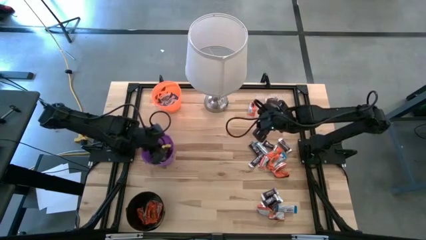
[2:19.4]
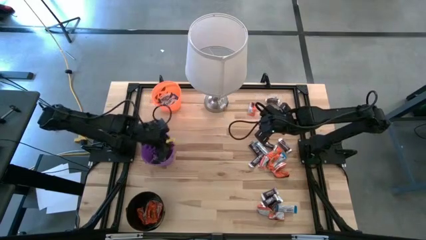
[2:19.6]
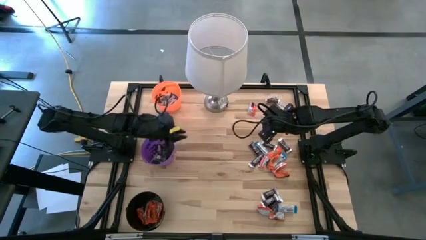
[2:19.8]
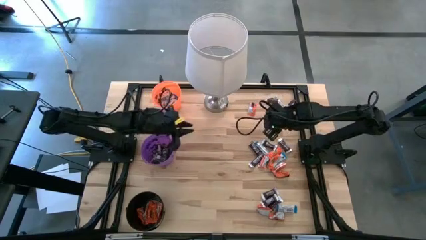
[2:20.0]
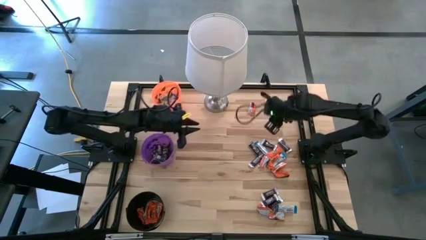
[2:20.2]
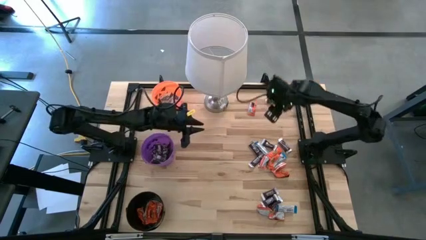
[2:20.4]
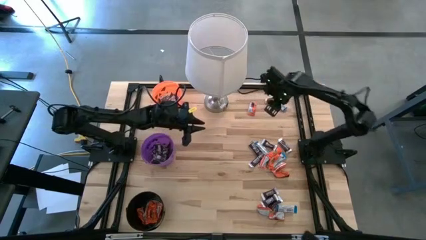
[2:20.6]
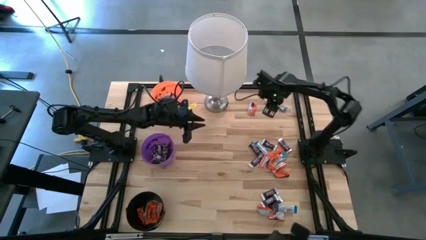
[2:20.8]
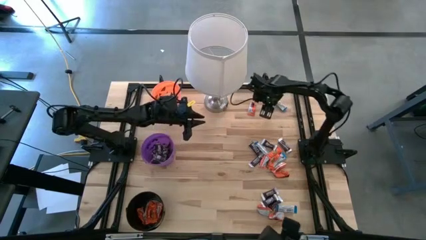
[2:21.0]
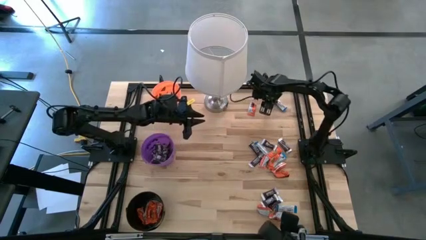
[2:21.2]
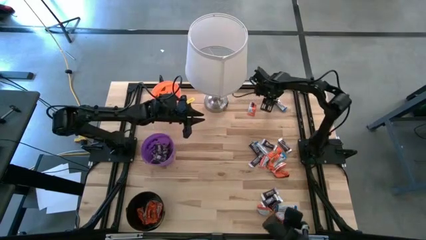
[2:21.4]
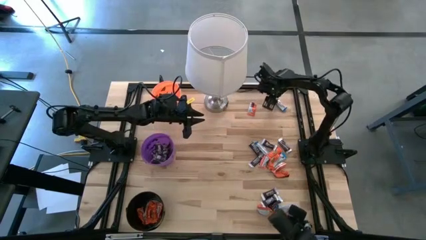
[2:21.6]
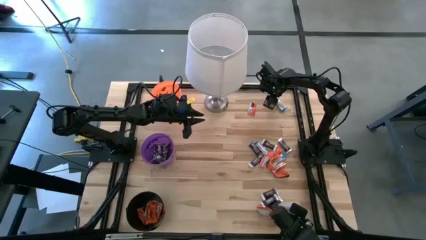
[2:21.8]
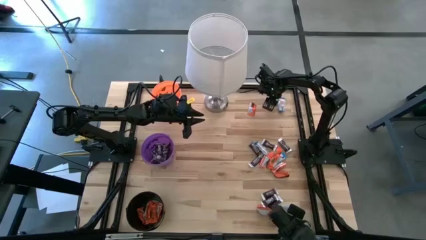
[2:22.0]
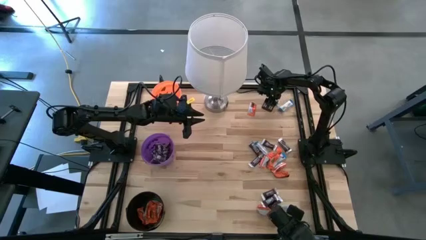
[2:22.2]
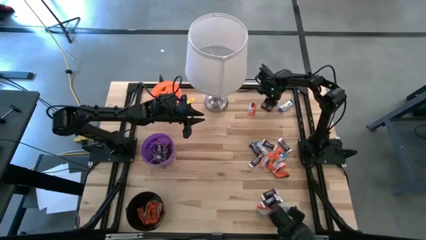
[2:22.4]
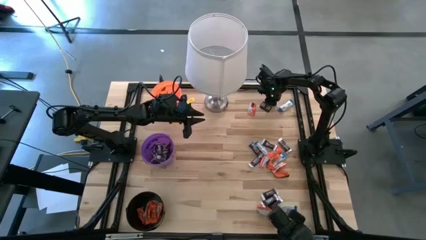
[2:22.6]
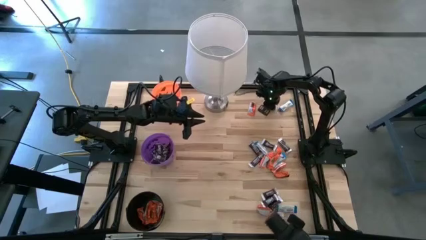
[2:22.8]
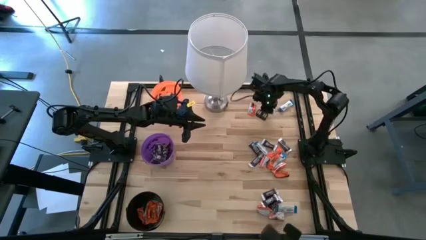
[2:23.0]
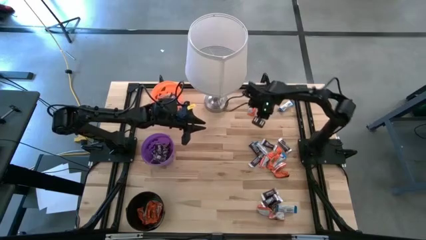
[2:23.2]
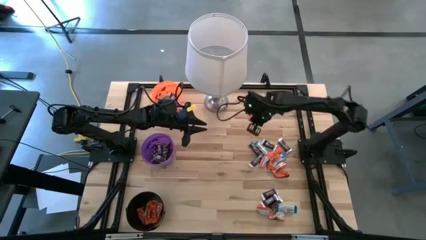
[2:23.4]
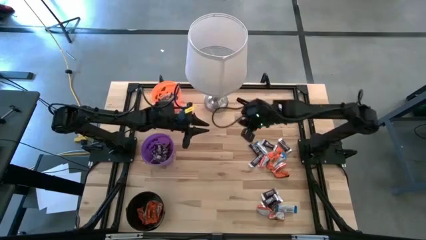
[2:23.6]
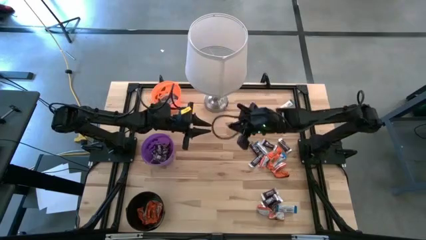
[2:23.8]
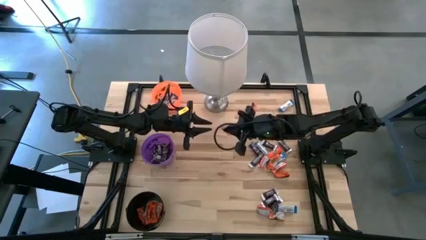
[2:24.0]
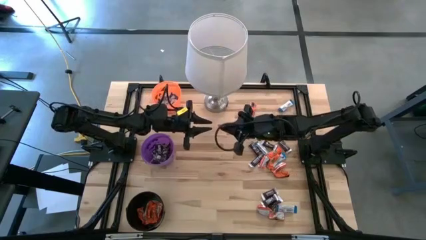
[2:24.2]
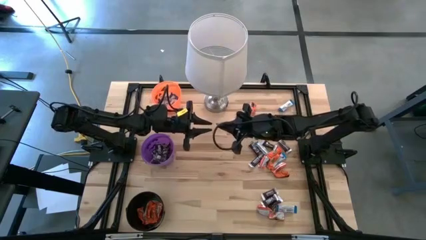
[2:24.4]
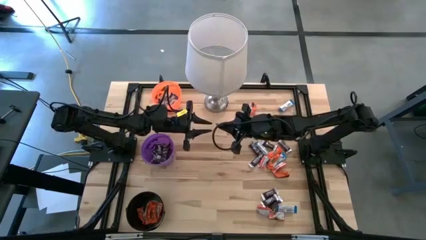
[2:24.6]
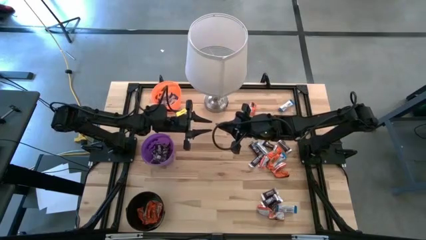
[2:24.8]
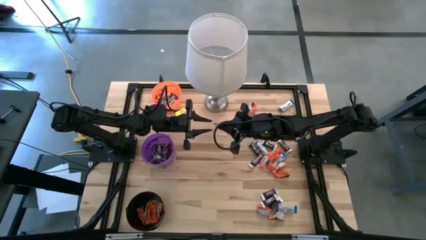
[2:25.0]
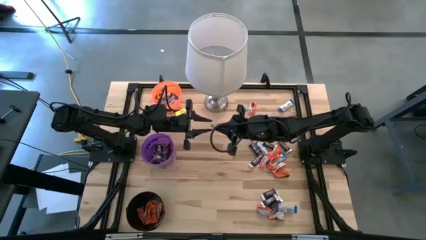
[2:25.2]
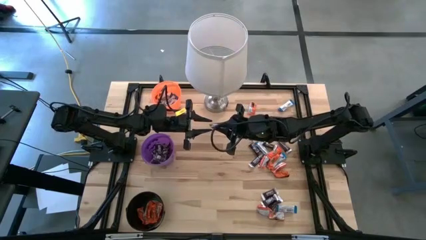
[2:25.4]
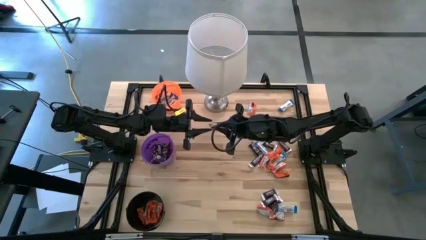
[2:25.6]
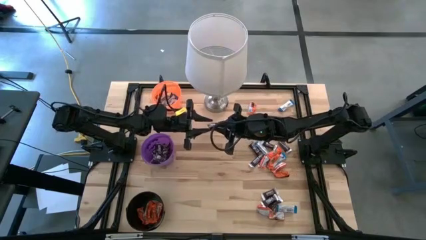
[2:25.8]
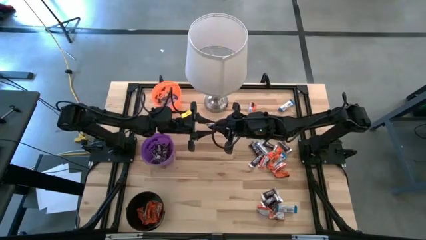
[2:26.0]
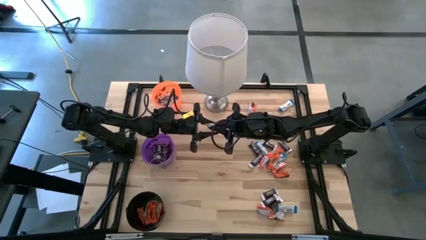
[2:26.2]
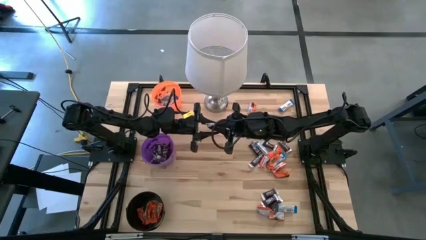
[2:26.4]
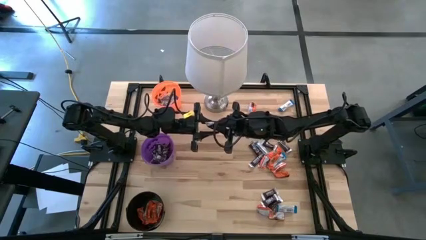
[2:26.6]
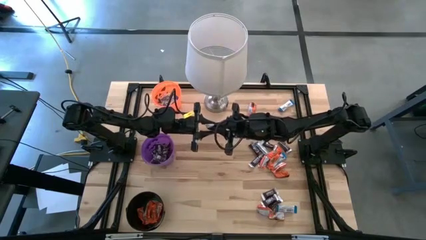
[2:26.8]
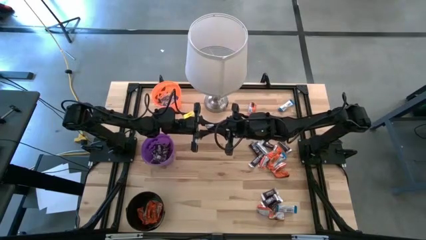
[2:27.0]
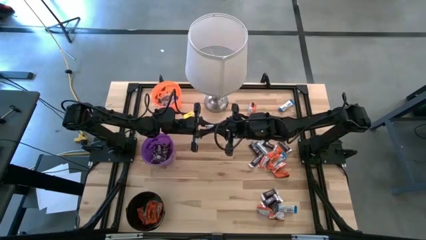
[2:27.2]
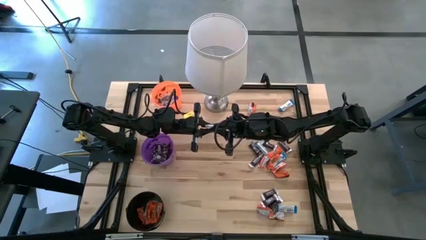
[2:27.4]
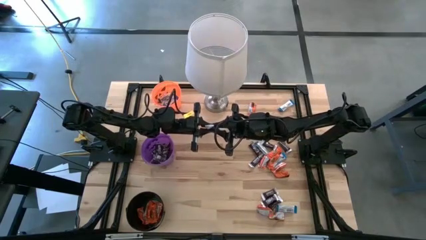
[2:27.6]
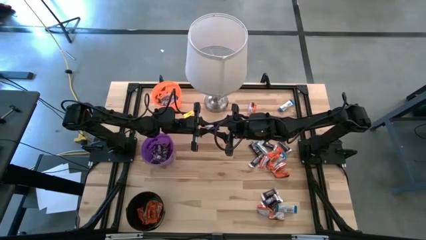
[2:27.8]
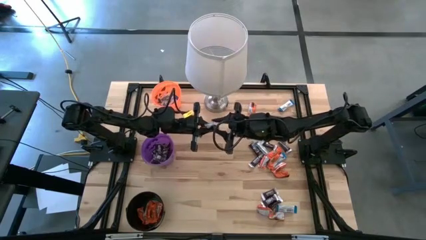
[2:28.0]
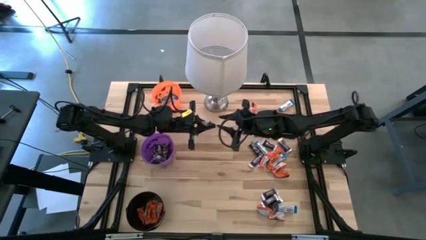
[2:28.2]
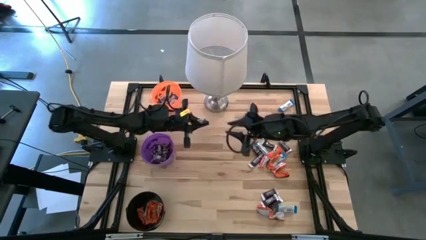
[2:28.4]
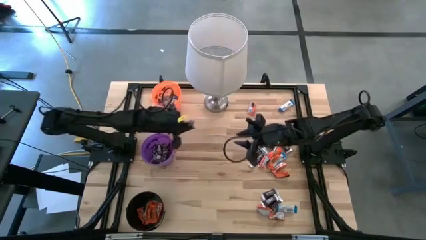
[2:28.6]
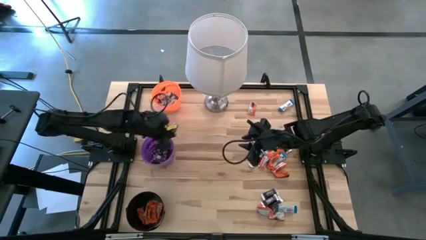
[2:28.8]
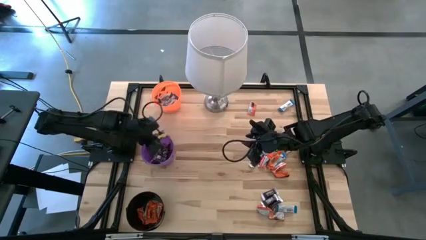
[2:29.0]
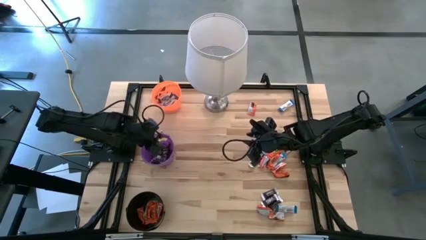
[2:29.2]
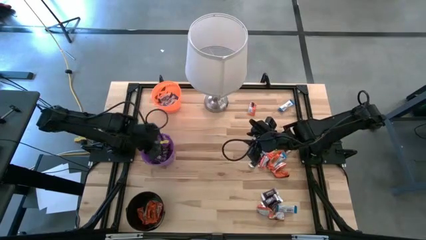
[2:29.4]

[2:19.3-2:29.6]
Task: Sort candy
Put the brown chocolate into the purple bucket

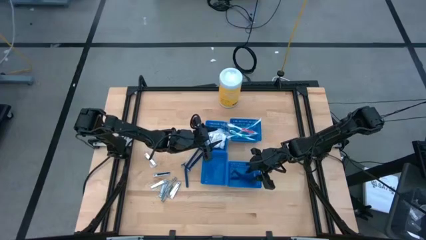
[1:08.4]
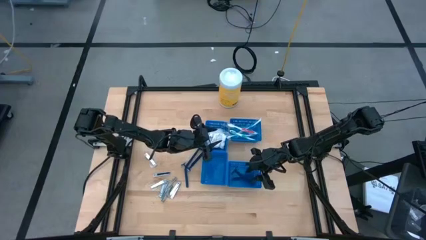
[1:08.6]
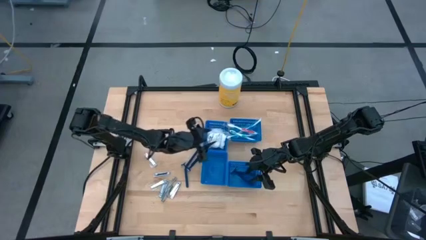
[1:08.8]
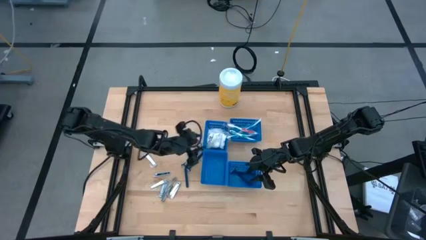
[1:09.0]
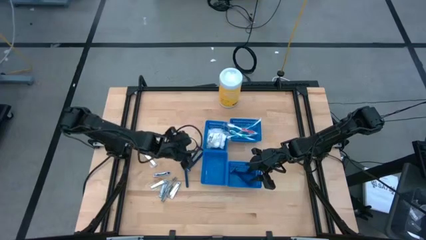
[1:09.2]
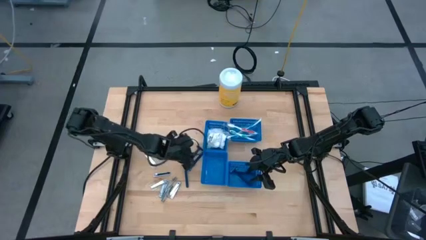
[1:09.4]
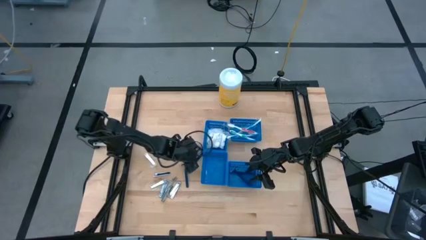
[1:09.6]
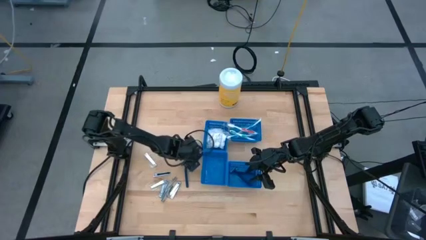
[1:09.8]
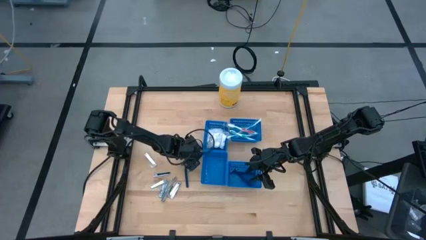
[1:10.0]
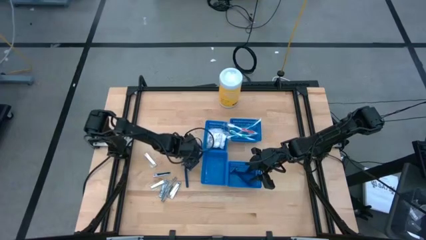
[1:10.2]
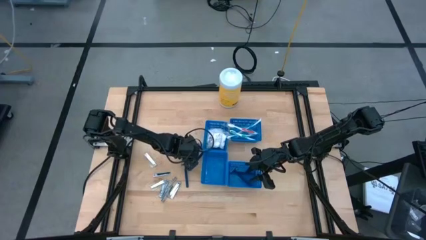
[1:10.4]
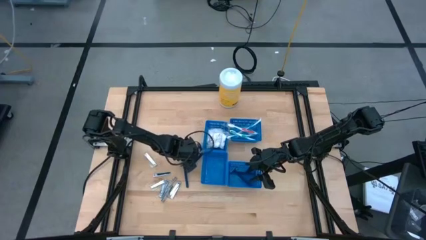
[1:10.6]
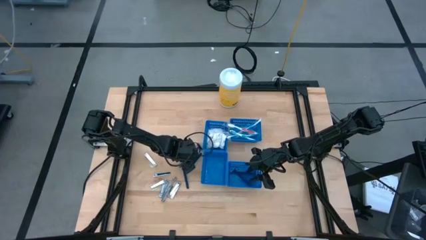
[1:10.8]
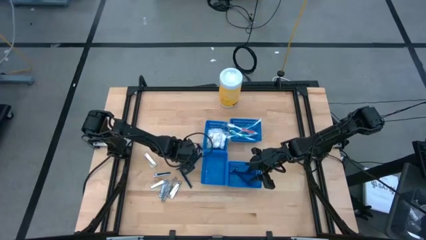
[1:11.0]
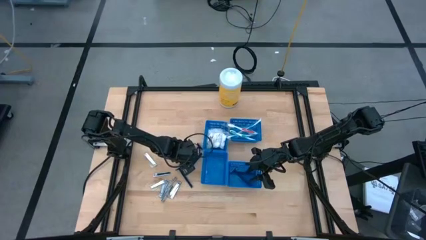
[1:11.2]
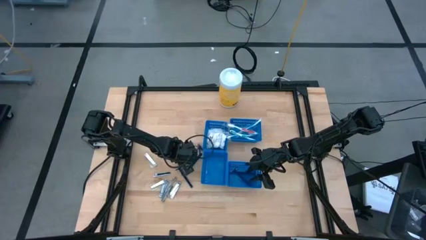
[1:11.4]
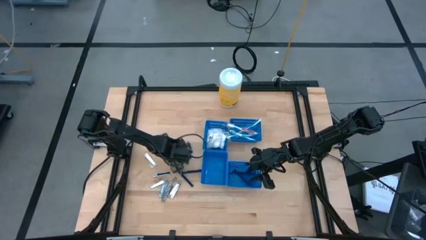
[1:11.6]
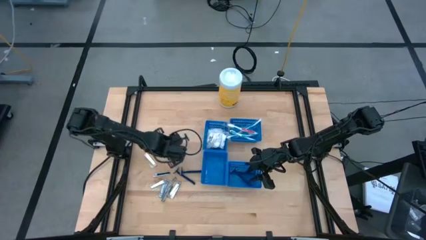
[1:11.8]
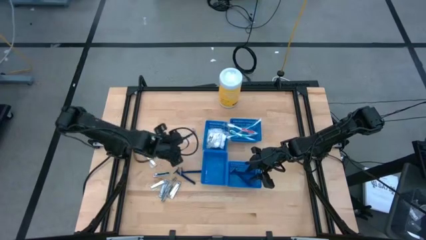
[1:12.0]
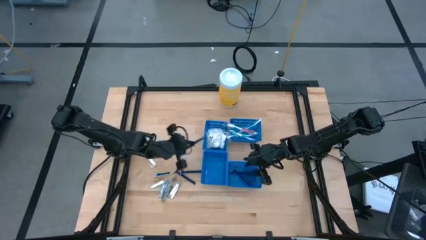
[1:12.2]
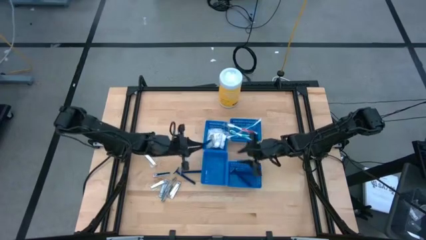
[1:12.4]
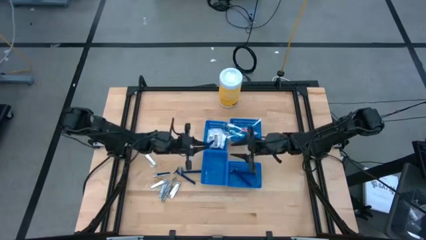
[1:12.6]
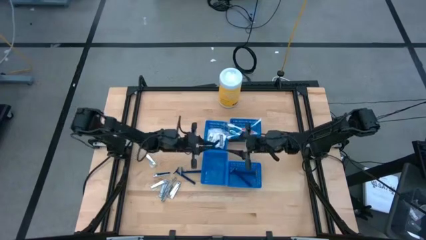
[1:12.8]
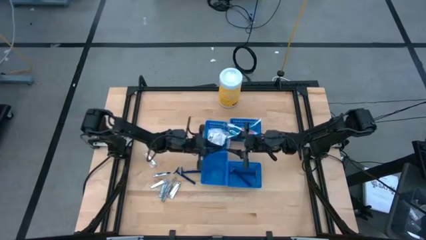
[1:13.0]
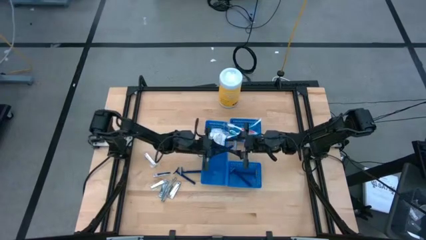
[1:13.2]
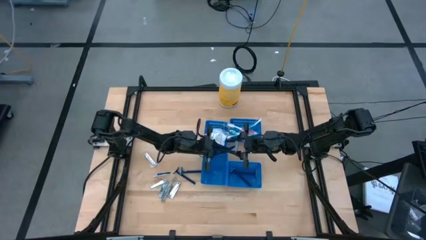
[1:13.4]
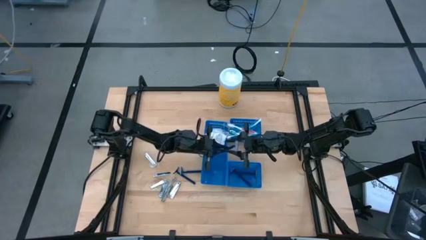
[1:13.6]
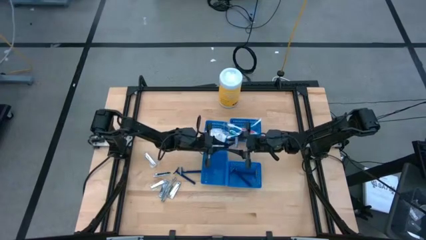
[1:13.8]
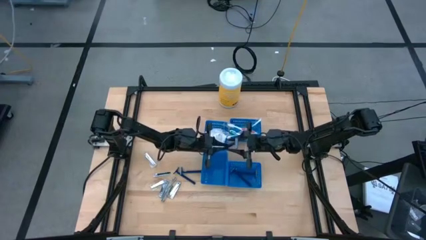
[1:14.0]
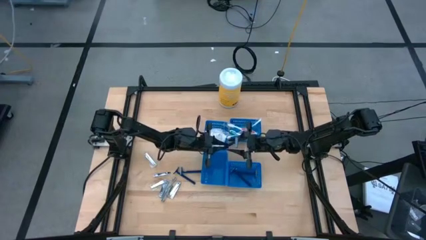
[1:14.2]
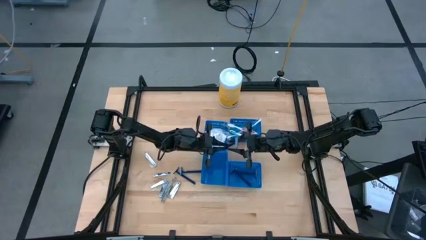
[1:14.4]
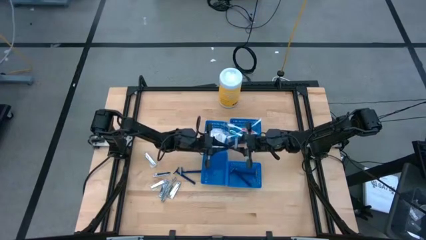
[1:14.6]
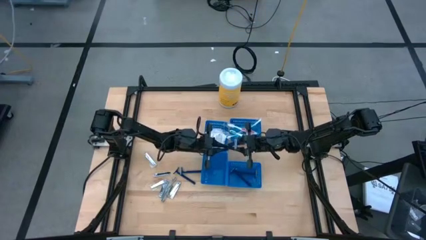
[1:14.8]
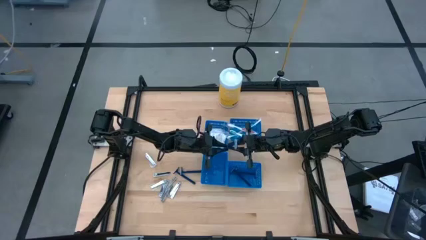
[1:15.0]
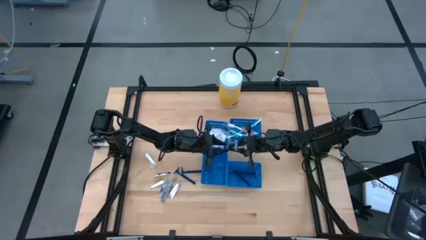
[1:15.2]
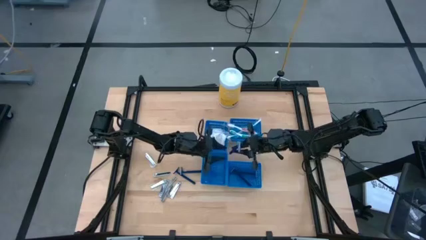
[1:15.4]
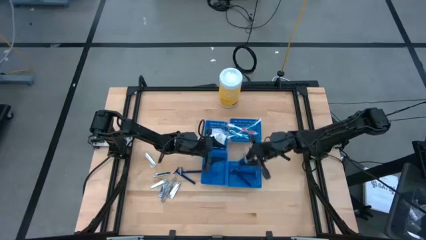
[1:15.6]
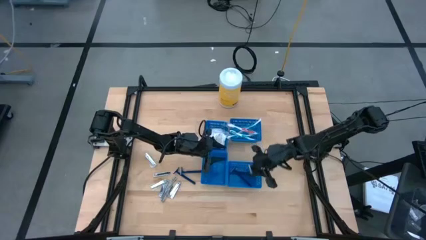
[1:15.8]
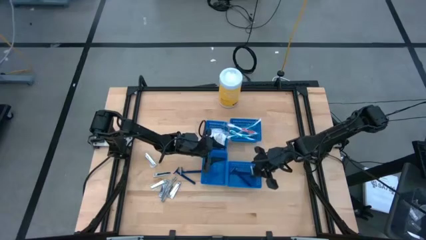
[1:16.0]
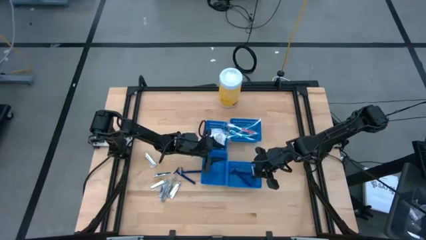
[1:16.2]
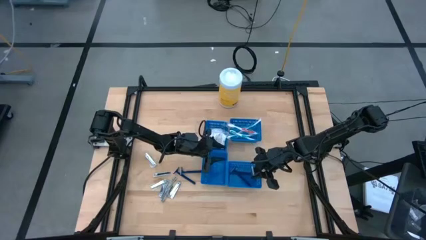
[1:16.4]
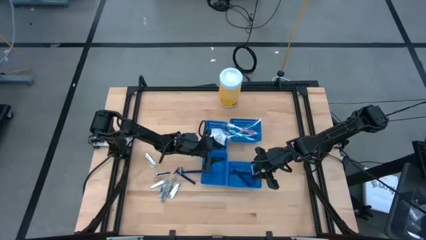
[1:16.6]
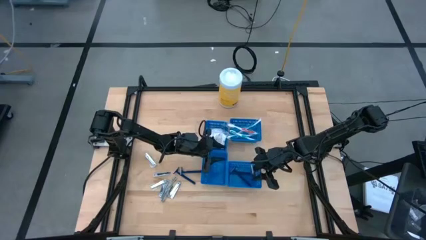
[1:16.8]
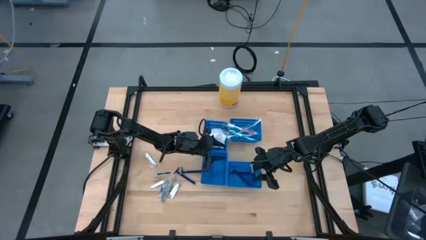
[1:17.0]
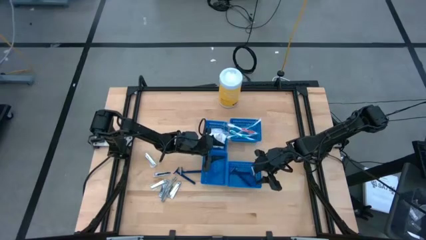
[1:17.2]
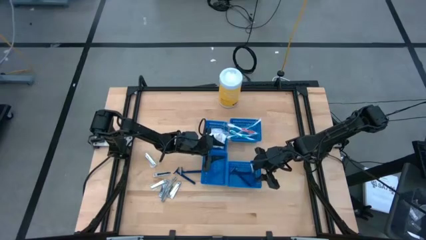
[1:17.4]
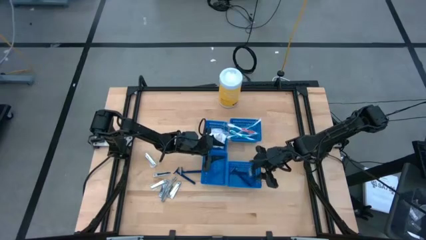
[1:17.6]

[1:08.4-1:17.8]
Task: Pick & Place Travel size toiletries
Put the blue razor into the bottom right blue bin
